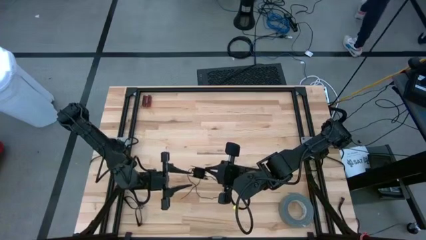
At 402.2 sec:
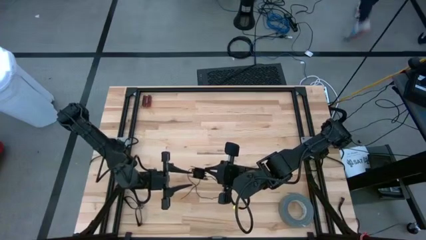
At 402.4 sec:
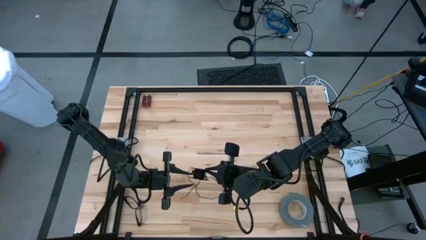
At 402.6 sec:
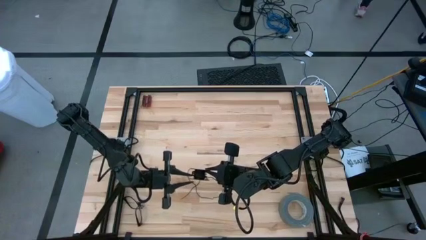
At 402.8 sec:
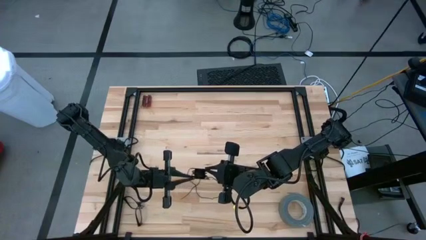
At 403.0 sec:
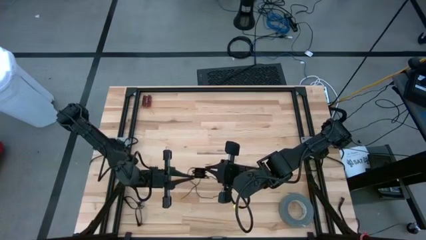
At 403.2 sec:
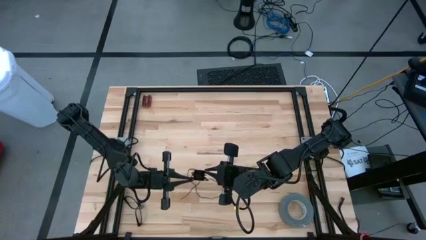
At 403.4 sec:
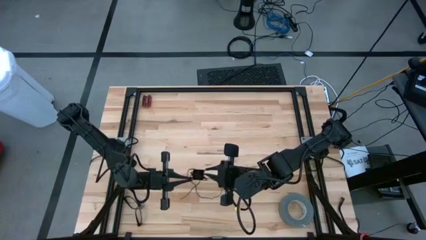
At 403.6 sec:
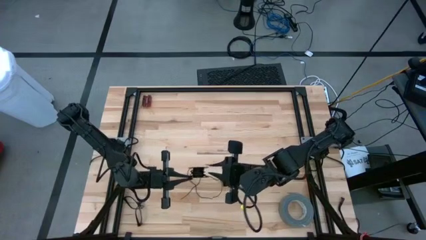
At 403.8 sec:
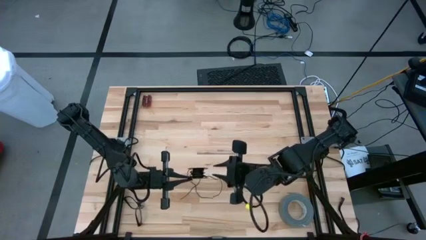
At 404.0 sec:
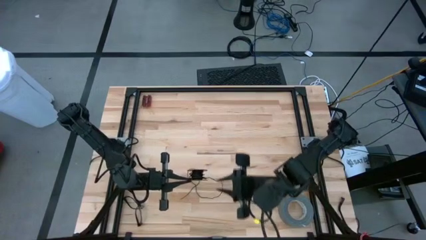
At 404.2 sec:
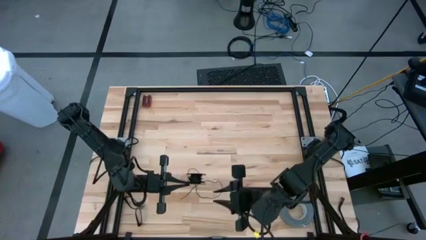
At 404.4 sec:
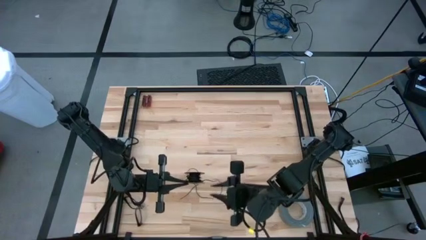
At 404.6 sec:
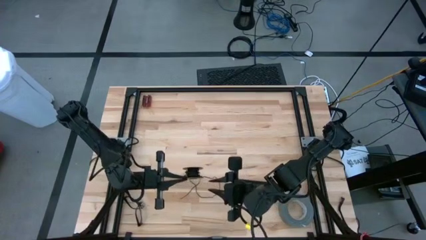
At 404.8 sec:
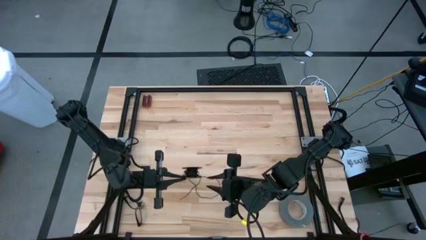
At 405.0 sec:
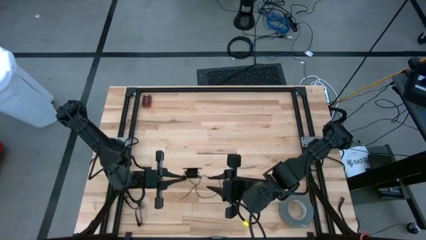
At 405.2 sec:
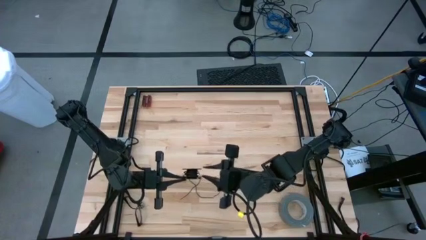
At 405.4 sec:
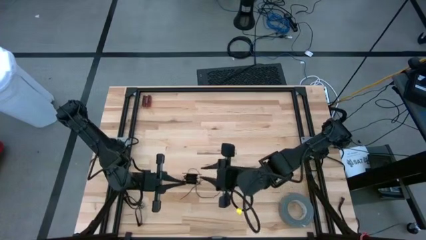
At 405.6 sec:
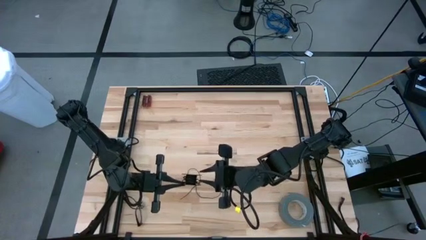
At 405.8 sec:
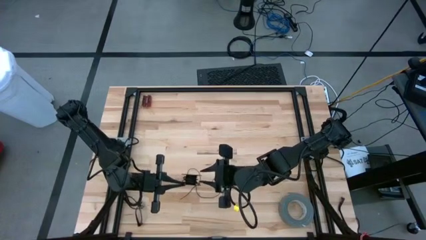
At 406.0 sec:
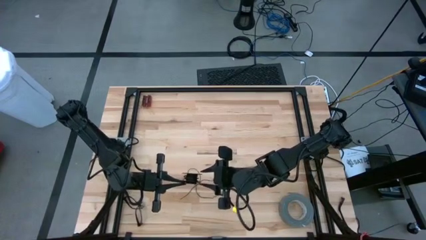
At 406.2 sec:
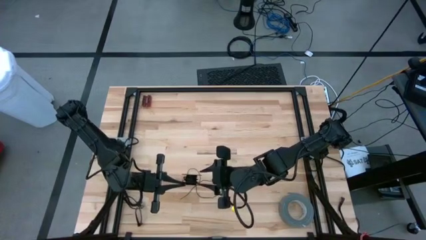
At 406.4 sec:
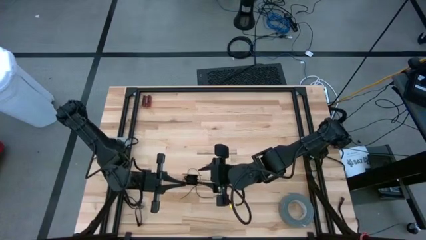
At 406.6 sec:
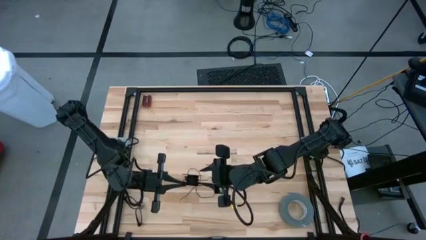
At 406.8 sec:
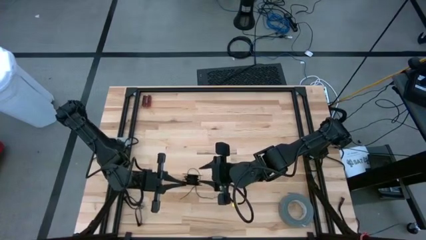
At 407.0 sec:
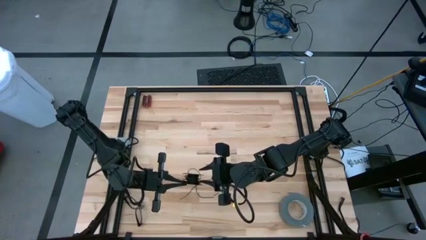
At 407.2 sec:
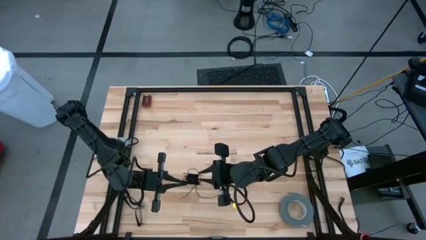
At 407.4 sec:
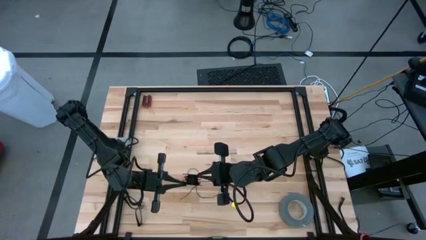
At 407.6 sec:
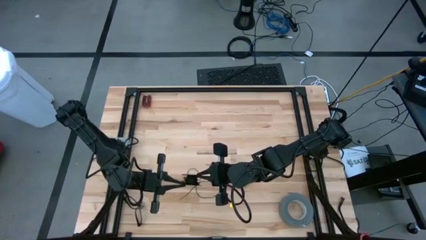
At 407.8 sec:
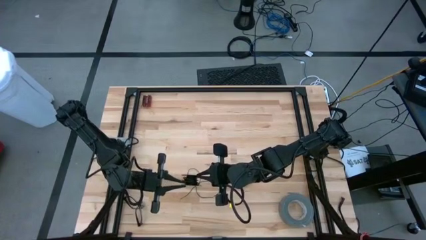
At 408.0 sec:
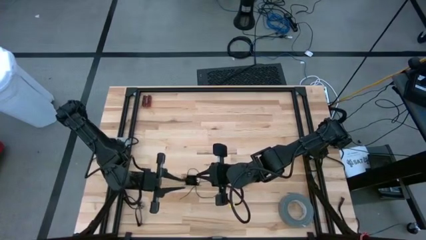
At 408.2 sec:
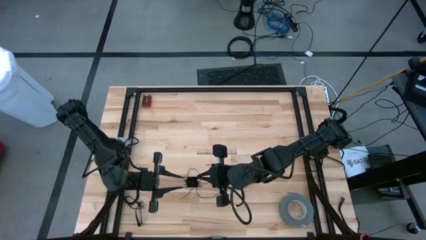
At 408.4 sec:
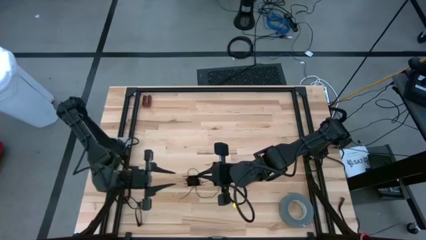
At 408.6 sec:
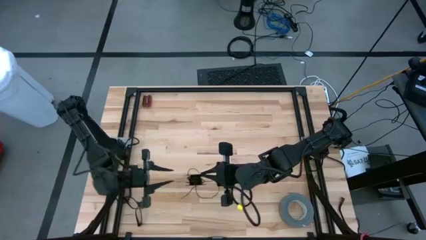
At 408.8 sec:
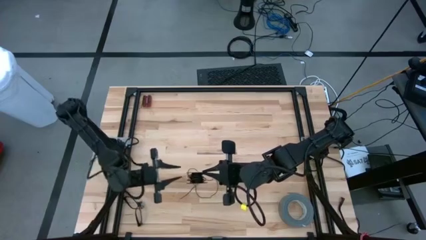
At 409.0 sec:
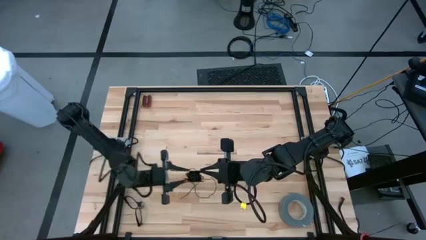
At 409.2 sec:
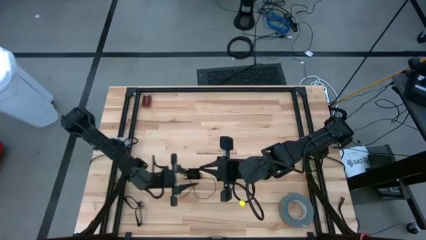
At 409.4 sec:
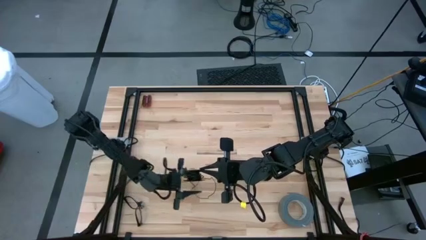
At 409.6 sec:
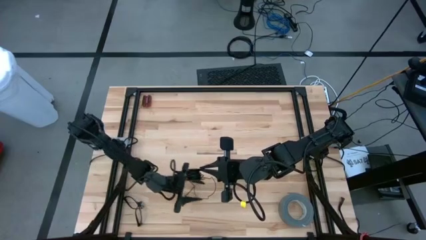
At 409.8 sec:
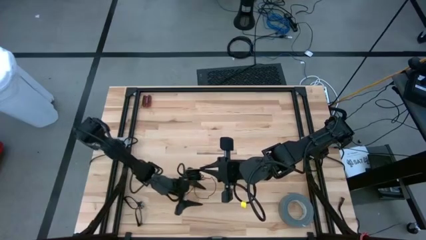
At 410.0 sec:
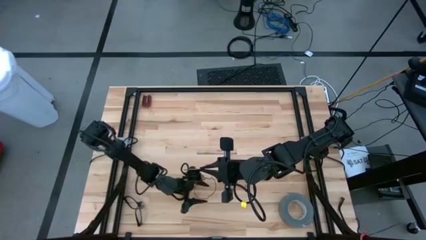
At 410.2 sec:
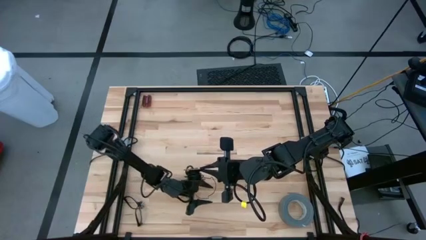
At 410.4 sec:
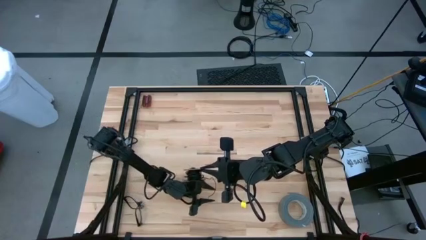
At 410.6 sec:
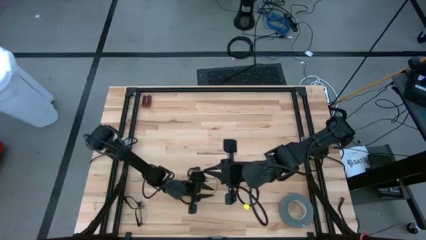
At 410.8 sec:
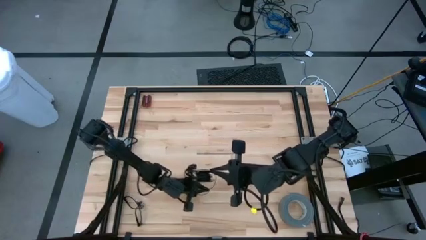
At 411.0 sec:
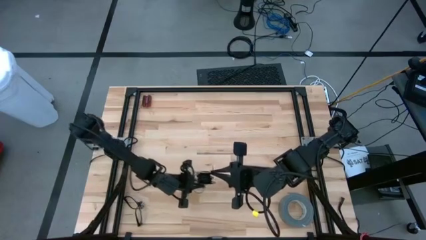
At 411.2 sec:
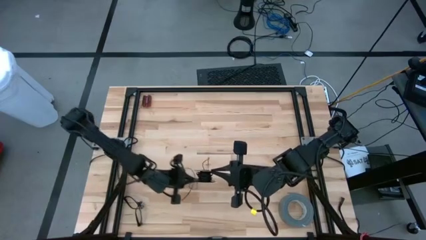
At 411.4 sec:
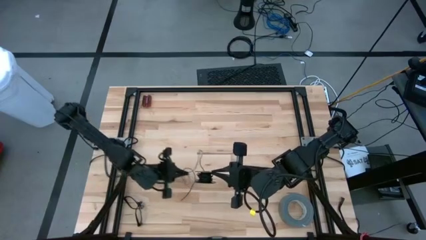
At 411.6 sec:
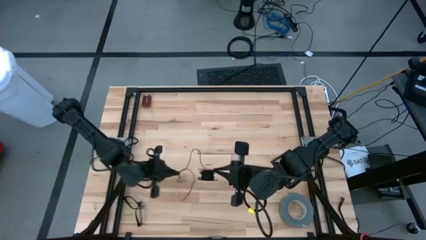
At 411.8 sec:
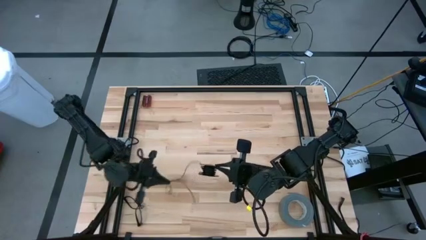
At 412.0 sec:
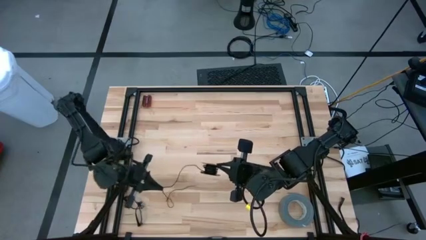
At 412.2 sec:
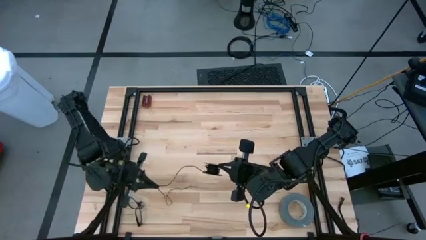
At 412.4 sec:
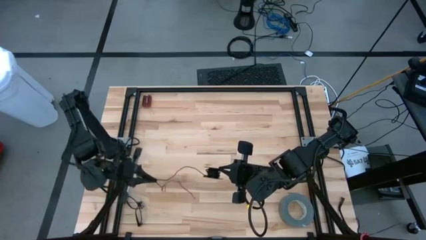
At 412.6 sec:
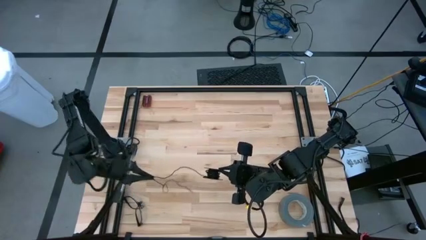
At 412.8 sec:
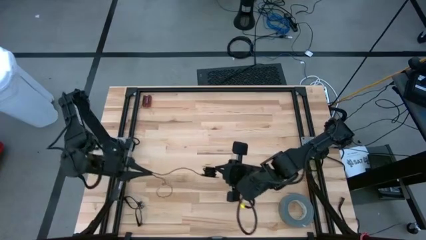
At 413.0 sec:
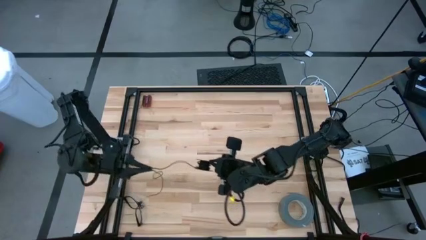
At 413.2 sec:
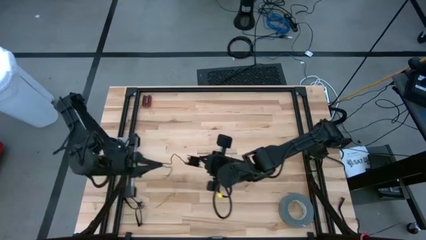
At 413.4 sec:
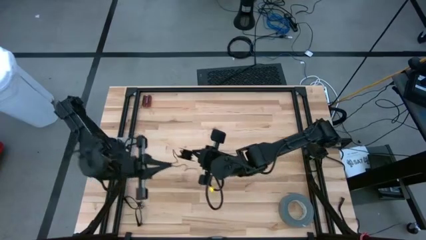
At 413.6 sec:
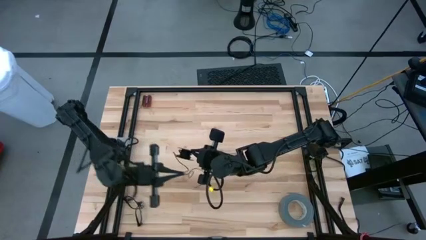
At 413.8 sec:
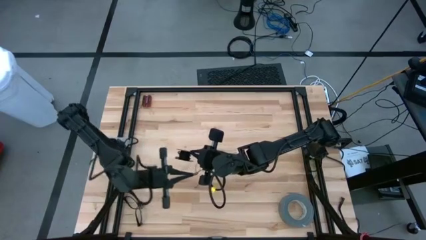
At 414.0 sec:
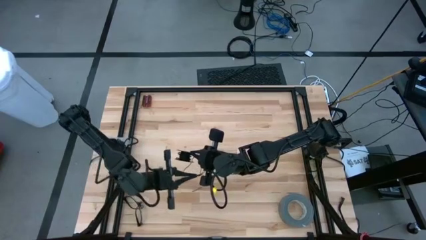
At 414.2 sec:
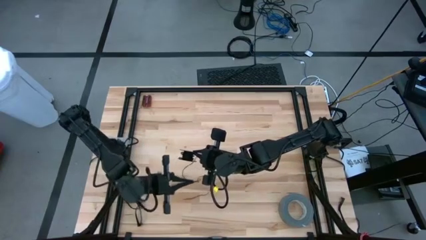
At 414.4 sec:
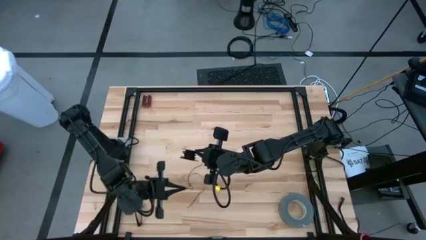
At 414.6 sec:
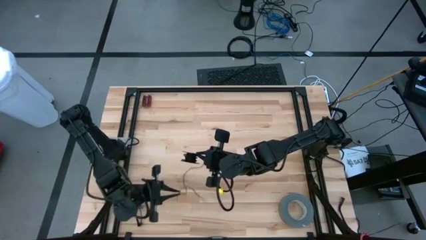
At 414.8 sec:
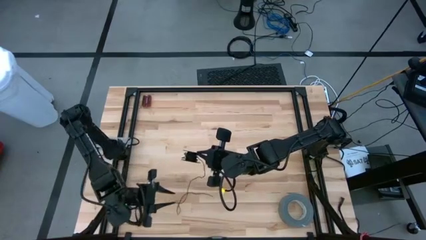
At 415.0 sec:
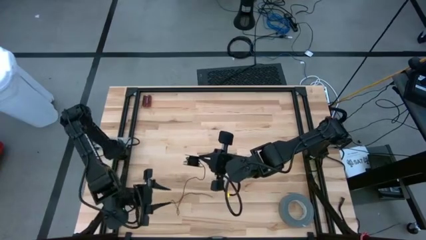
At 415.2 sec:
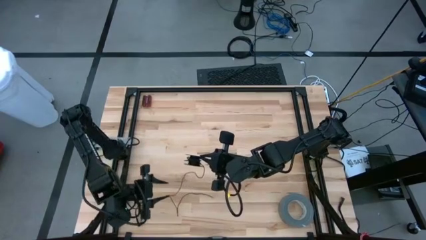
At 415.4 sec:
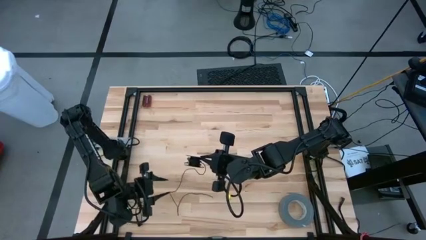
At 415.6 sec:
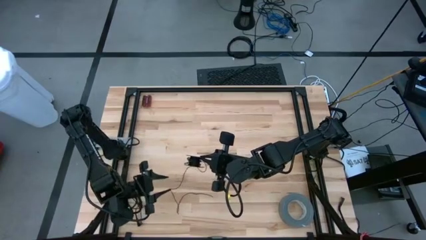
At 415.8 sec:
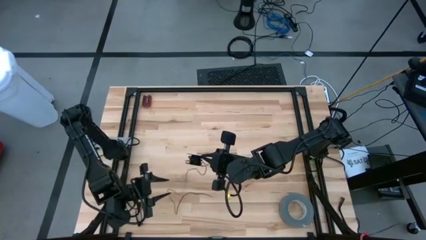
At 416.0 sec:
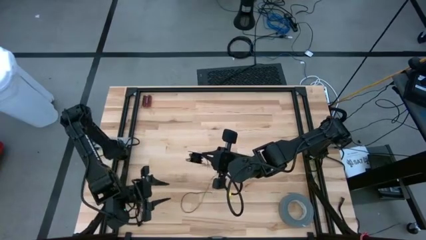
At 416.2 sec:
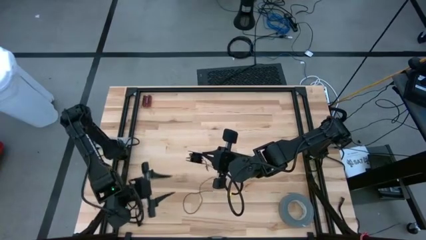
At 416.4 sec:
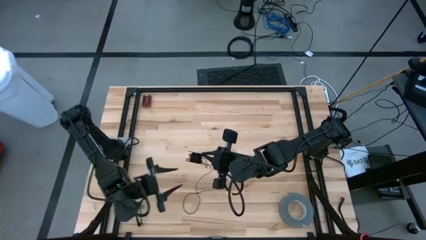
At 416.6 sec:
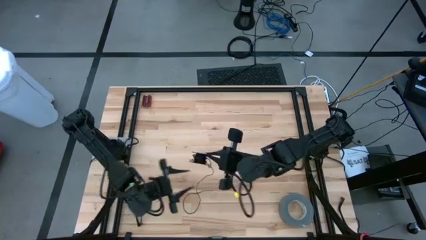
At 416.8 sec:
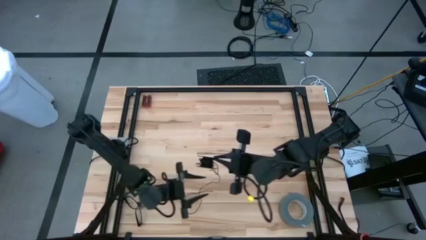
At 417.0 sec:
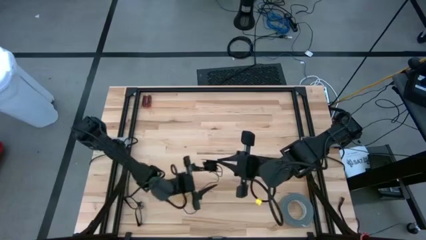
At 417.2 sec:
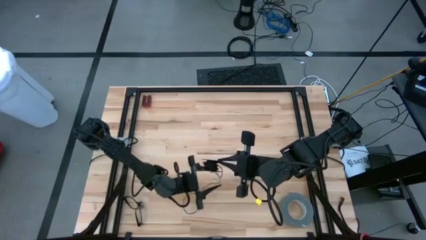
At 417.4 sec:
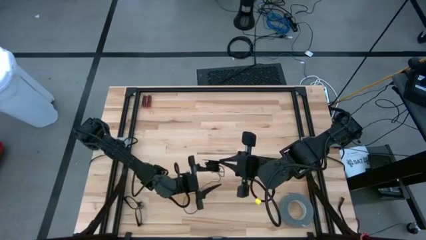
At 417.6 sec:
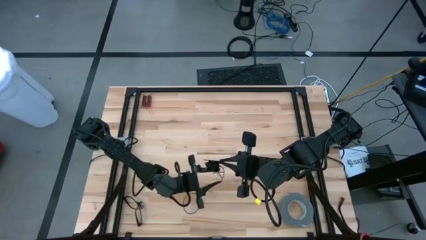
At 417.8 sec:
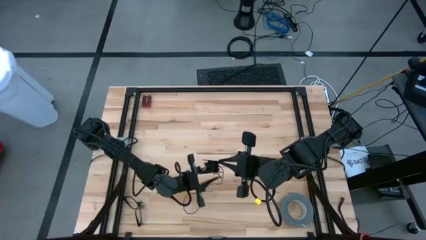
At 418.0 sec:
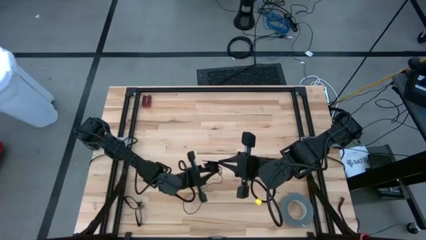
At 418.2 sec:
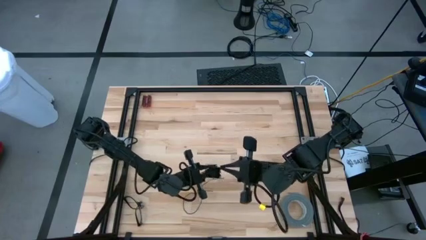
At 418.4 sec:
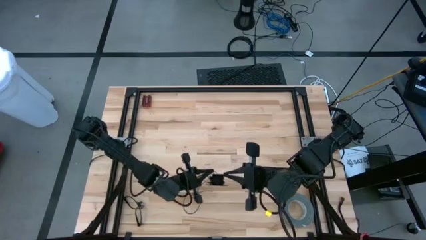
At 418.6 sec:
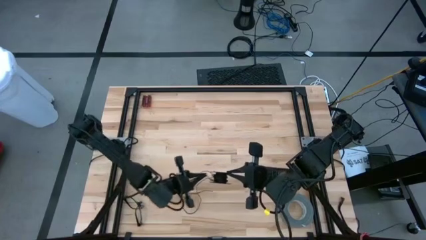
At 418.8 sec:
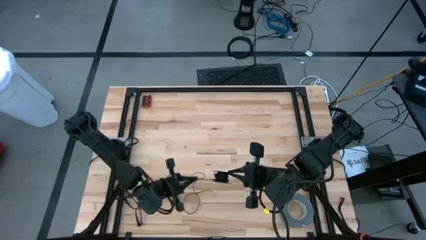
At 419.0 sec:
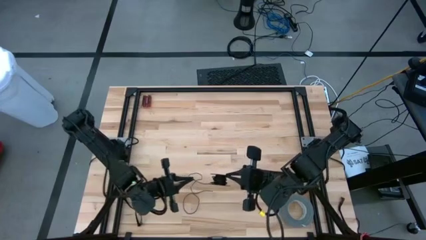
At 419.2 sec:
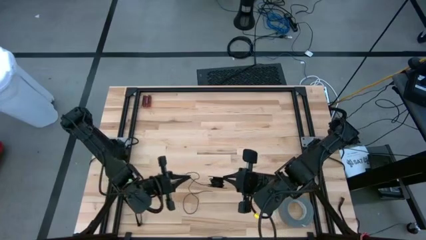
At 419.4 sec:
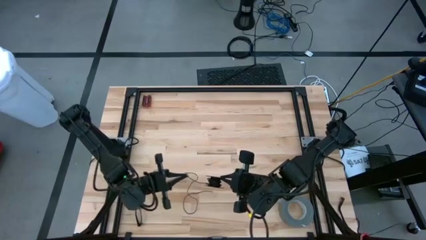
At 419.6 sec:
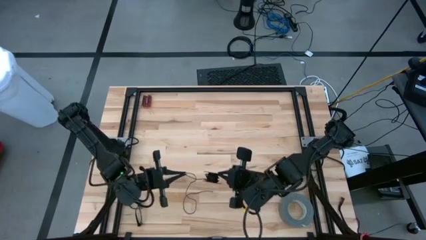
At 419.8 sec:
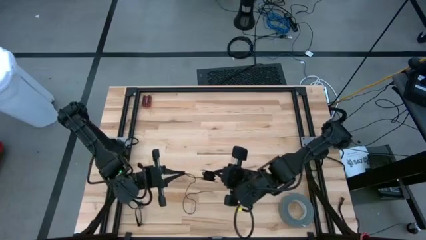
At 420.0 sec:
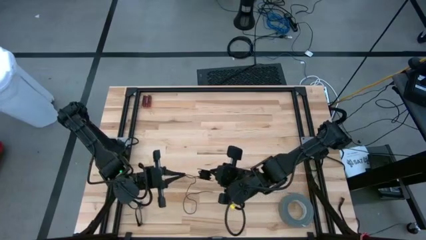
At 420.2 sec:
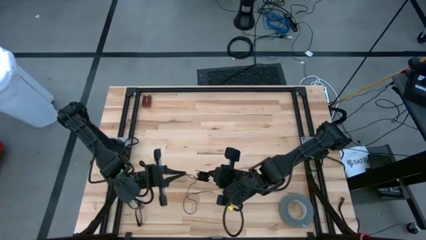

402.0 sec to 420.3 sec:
Task: Coil cords
Coil the black wire on the spool
